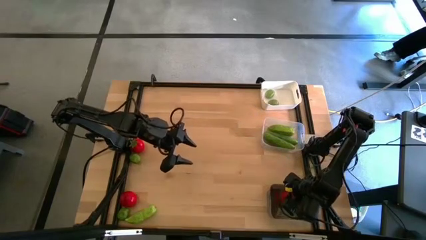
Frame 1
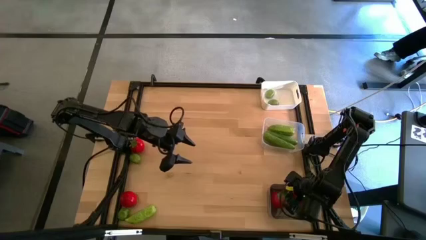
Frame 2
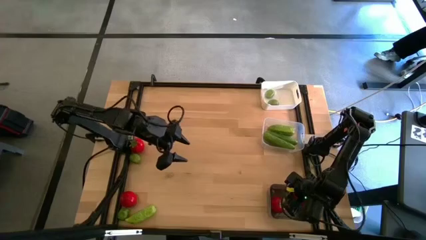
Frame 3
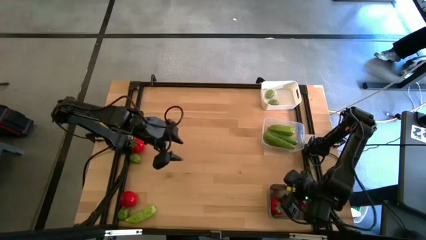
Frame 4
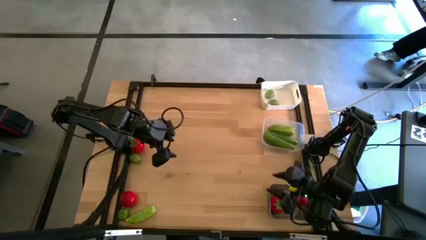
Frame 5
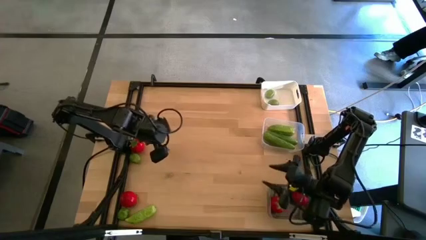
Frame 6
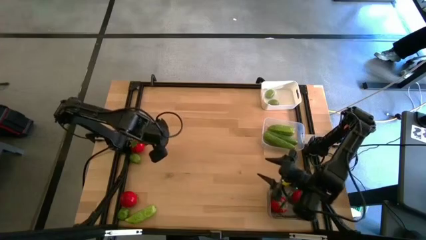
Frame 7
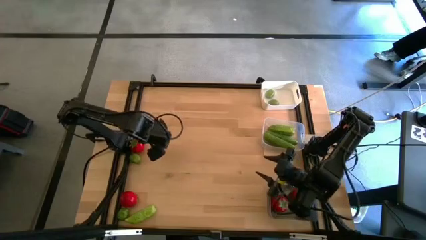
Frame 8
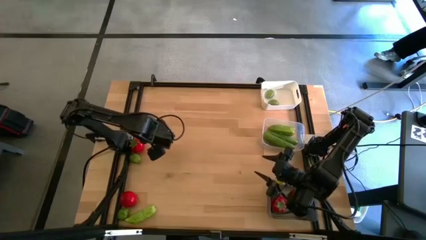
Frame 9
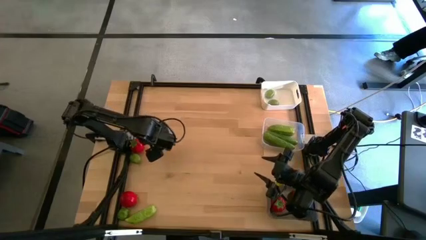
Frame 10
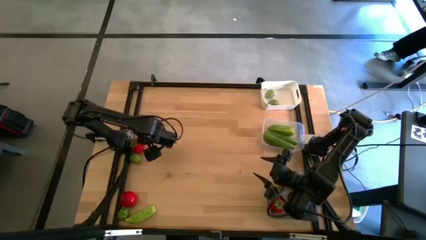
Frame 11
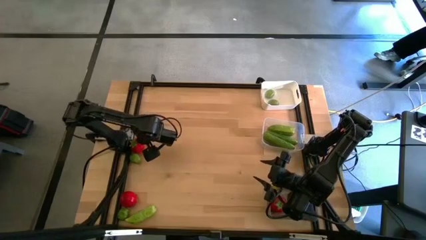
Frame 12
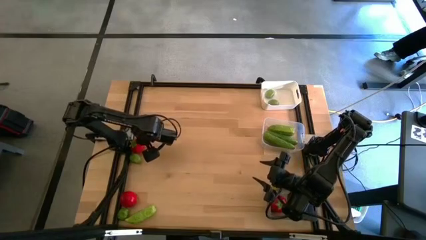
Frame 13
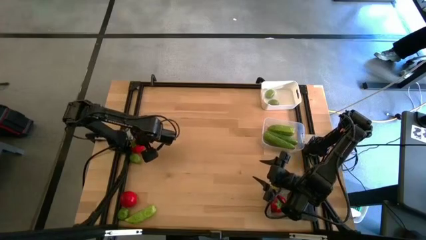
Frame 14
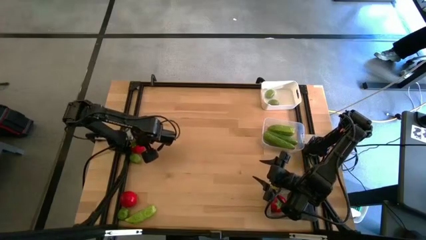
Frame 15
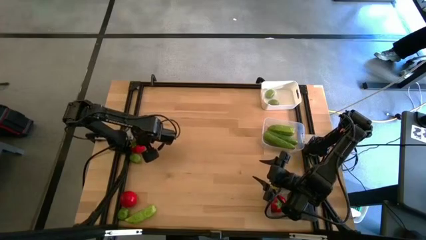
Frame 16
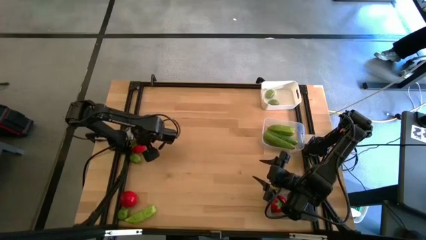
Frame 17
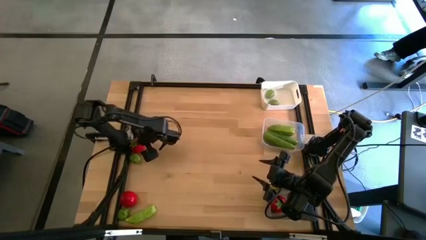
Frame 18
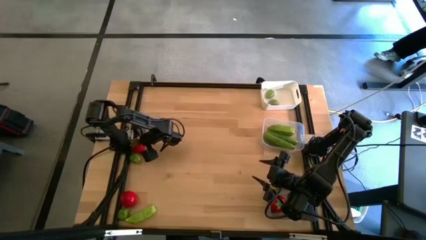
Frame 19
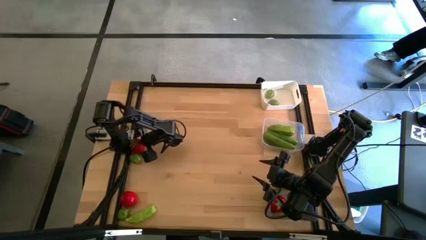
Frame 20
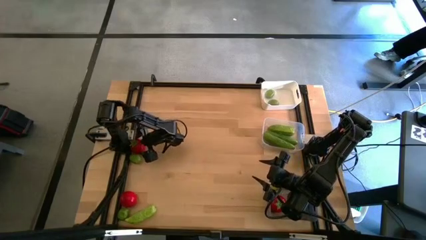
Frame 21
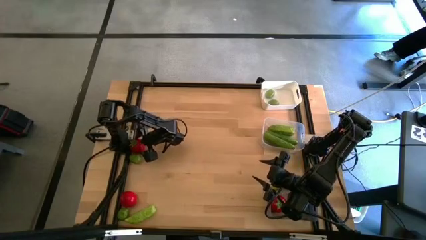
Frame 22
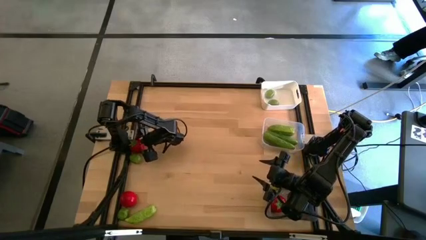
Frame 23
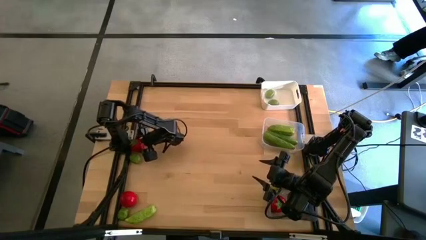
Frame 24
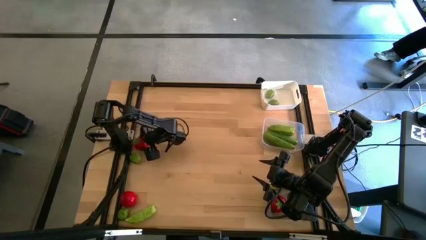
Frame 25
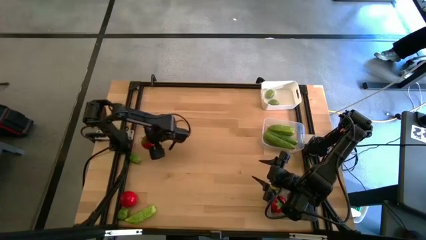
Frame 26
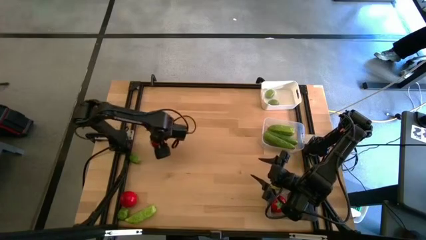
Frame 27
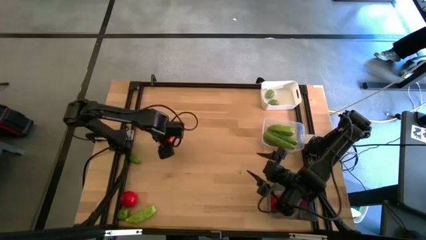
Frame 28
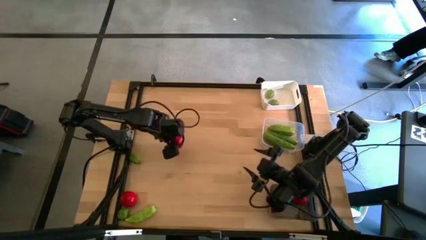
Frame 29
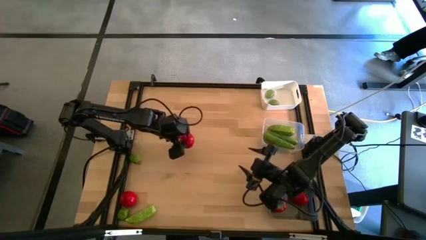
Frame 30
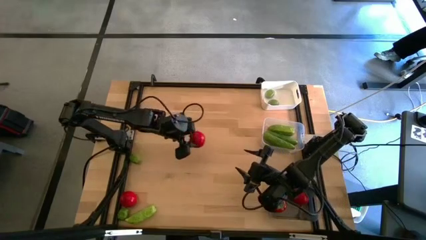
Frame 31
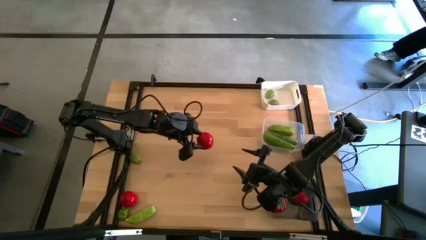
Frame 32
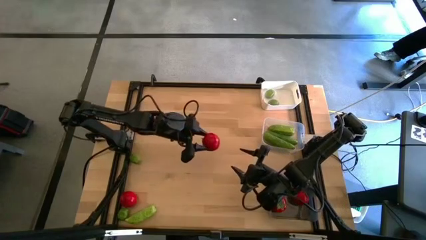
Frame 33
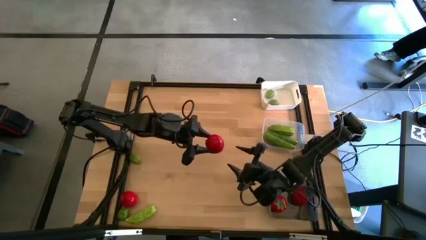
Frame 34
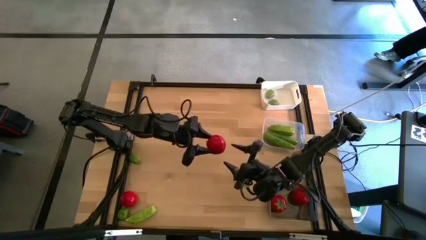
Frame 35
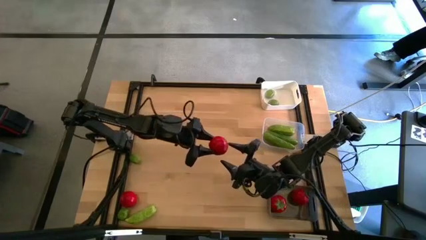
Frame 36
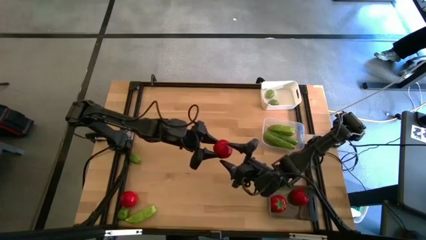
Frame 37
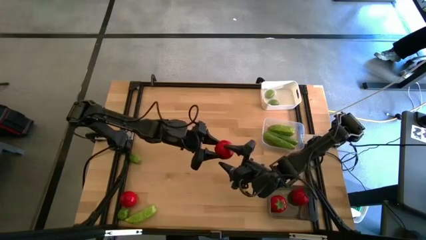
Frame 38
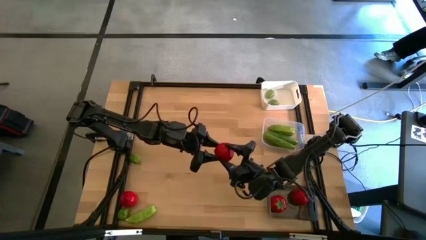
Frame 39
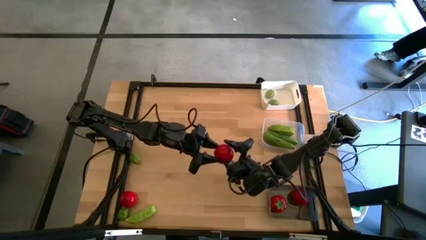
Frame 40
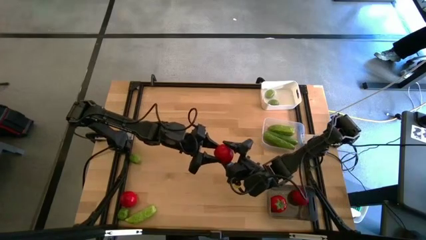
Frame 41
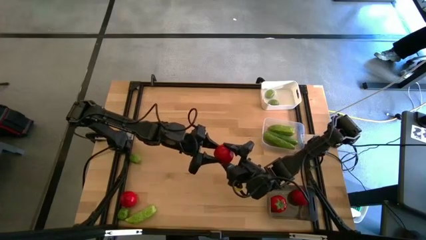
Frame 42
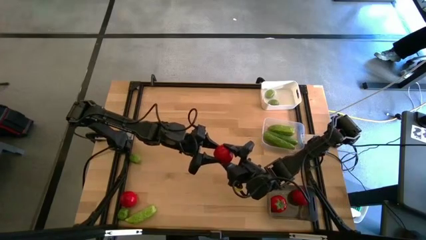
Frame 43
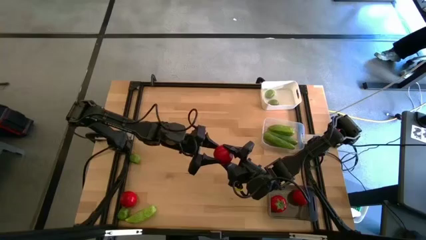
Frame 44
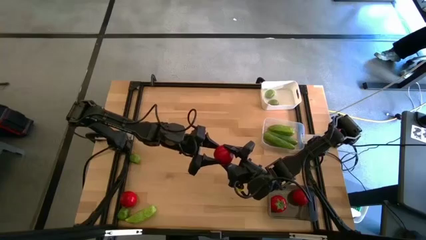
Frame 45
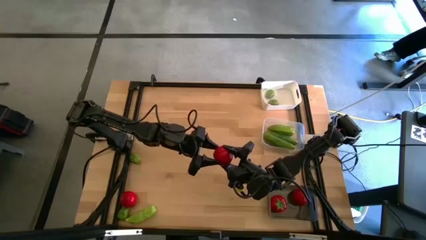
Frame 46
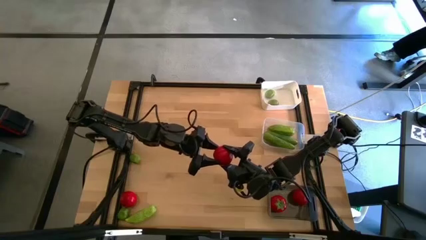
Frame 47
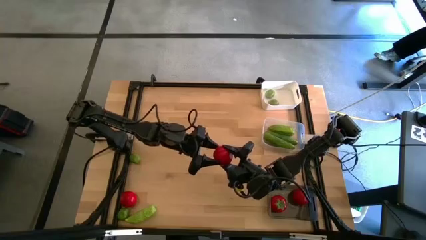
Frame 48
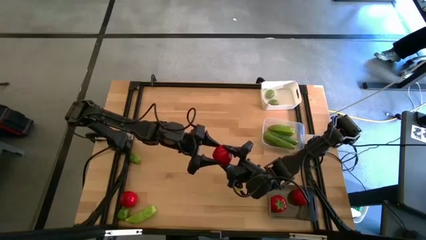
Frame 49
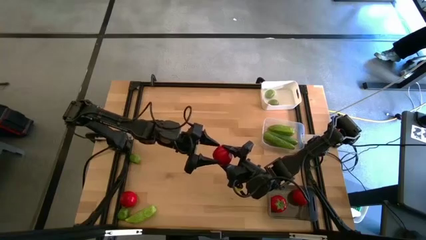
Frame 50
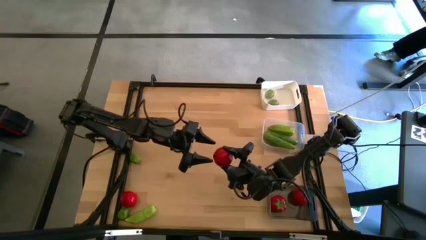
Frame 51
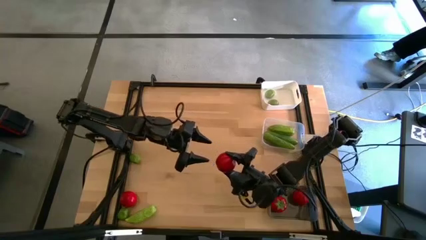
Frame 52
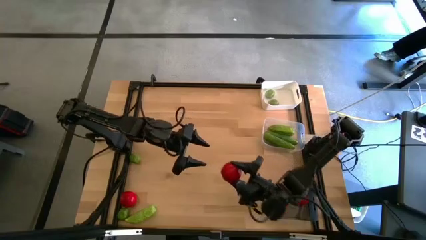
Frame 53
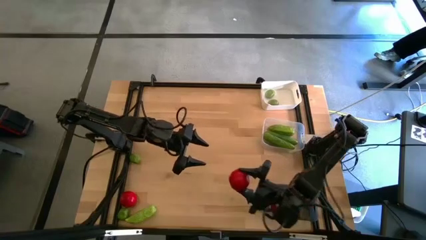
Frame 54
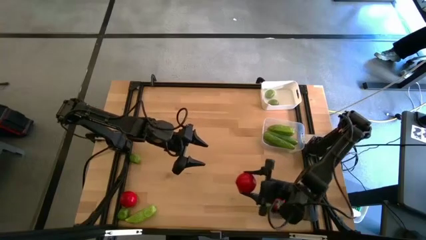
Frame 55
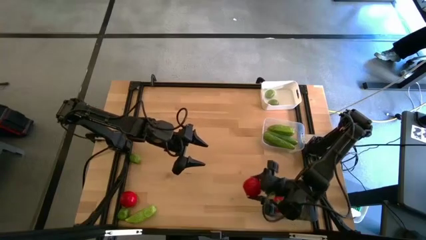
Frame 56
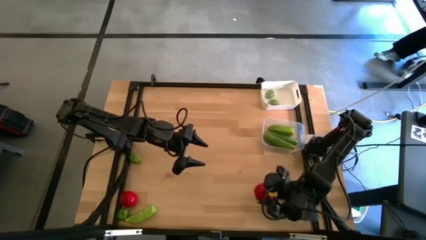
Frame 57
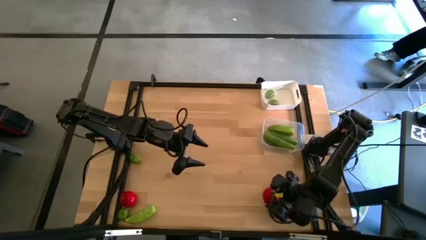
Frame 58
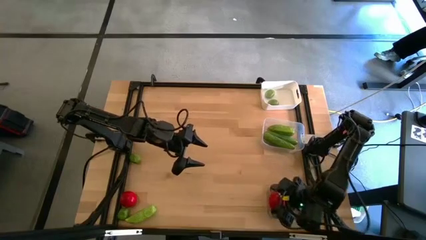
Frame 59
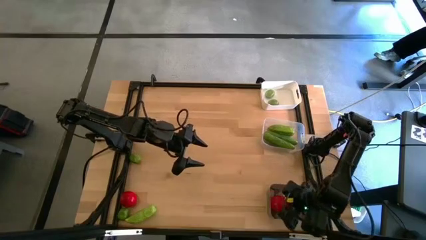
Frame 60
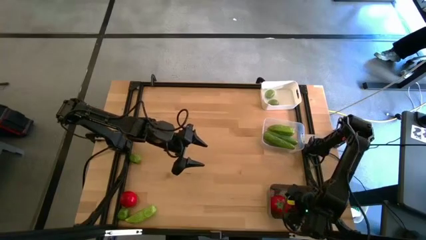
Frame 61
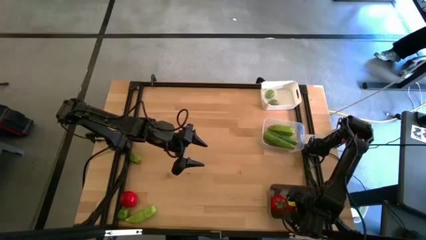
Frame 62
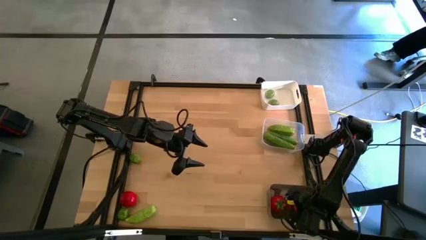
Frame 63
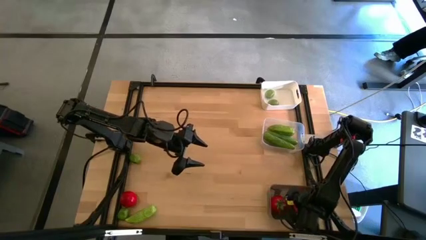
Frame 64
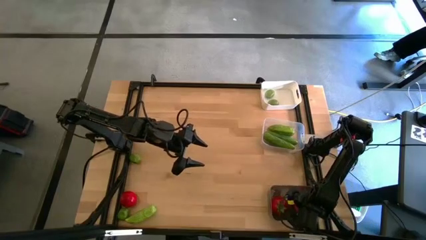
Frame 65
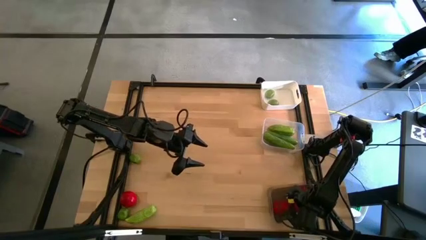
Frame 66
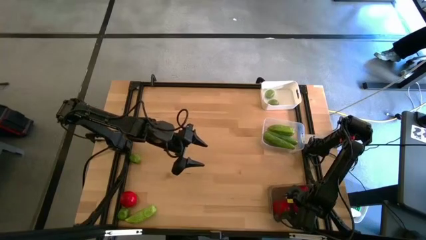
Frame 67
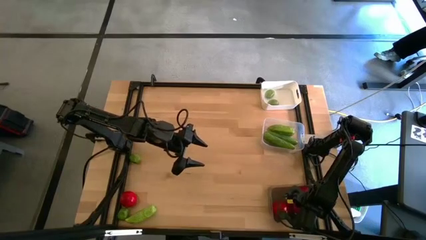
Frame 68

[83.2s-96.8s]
Task: Sort produce into baskets
Put the bottom tomato into the black bin
